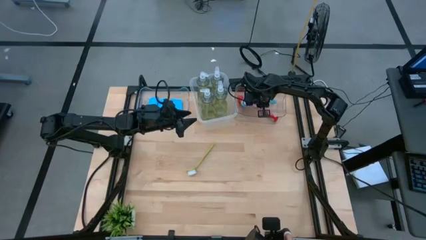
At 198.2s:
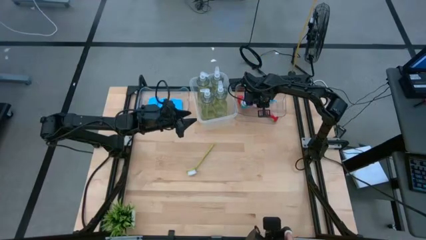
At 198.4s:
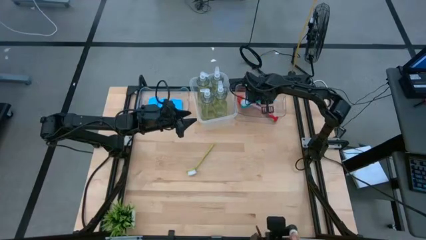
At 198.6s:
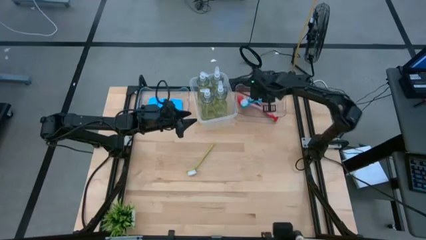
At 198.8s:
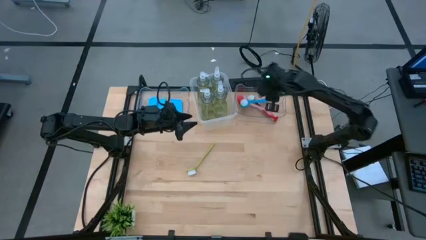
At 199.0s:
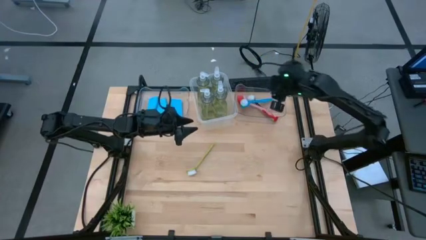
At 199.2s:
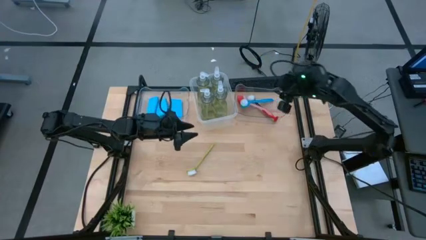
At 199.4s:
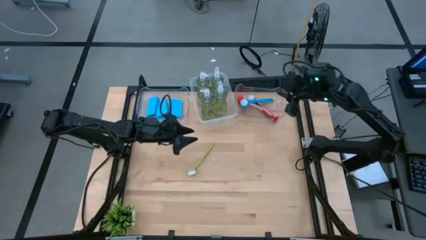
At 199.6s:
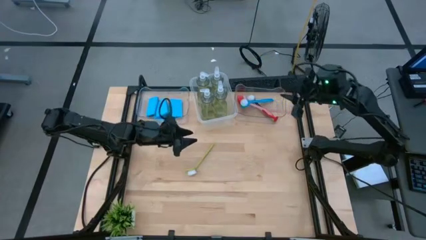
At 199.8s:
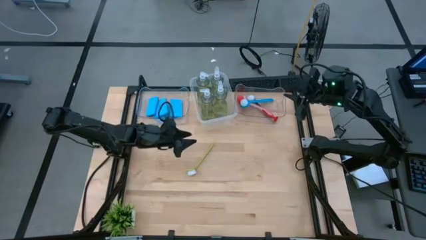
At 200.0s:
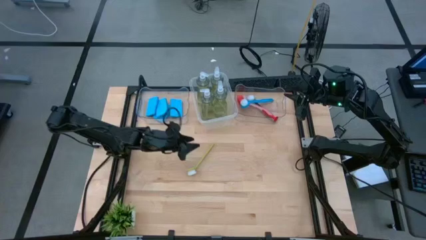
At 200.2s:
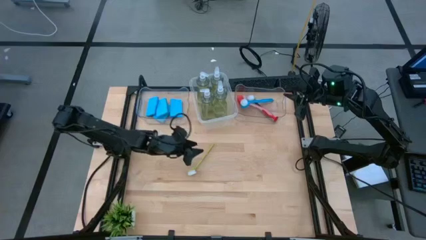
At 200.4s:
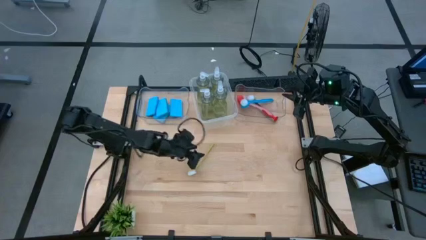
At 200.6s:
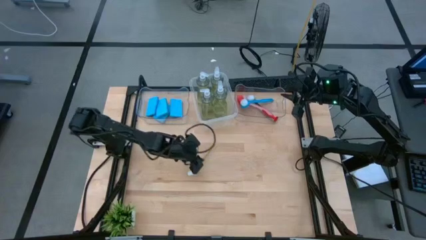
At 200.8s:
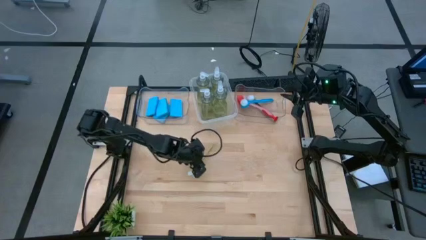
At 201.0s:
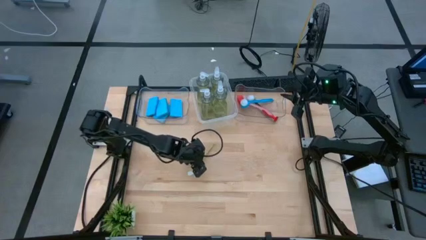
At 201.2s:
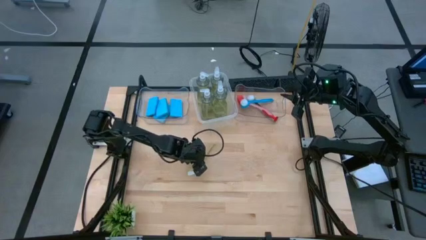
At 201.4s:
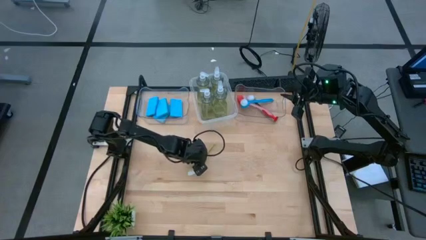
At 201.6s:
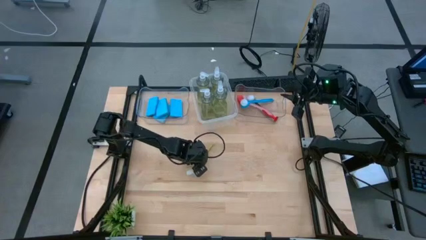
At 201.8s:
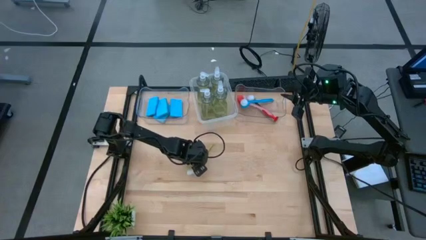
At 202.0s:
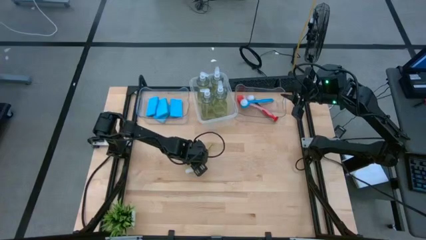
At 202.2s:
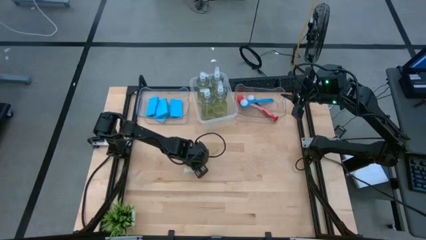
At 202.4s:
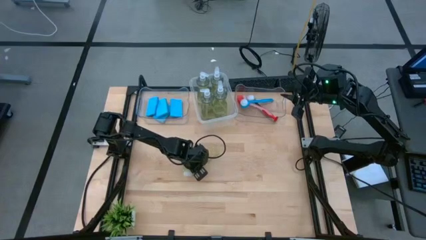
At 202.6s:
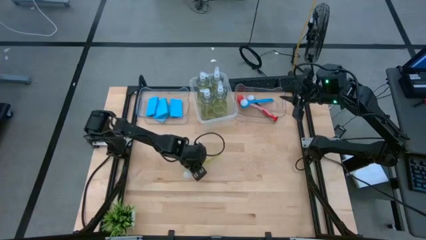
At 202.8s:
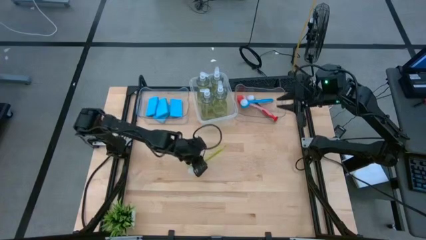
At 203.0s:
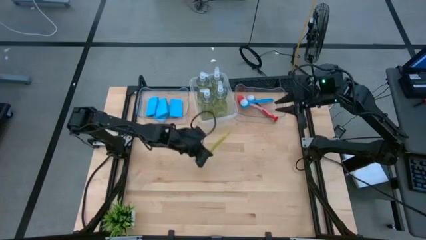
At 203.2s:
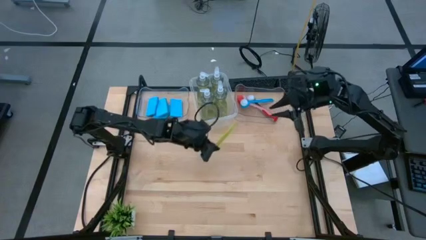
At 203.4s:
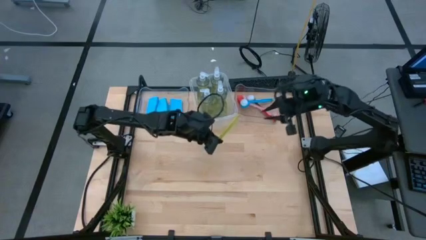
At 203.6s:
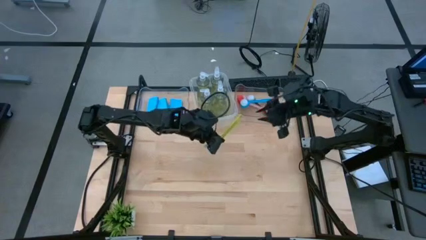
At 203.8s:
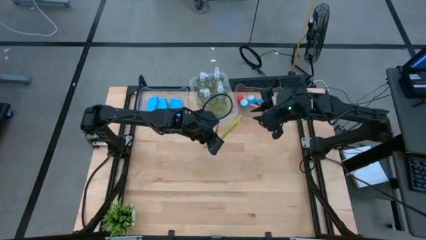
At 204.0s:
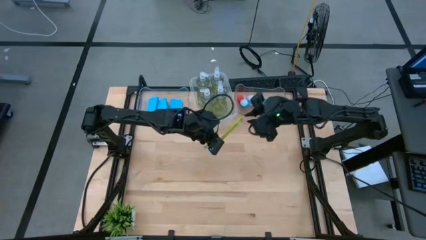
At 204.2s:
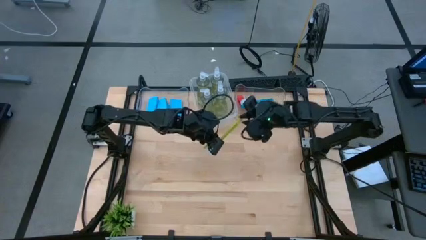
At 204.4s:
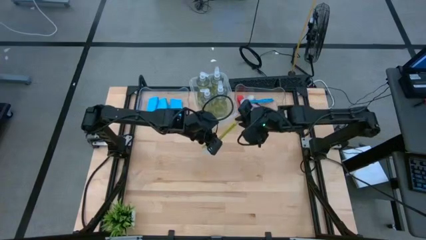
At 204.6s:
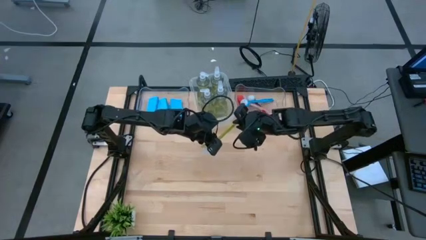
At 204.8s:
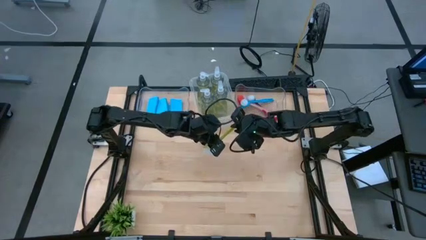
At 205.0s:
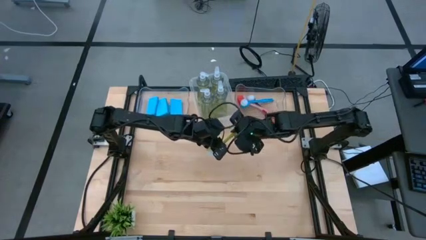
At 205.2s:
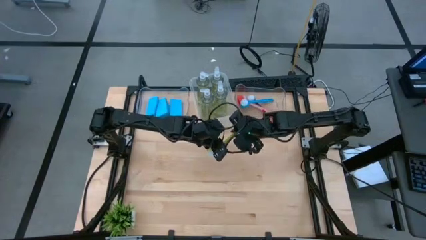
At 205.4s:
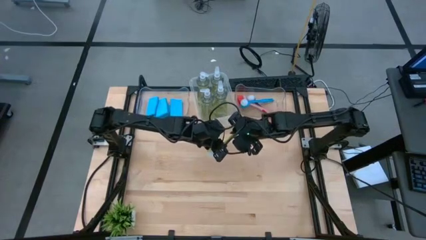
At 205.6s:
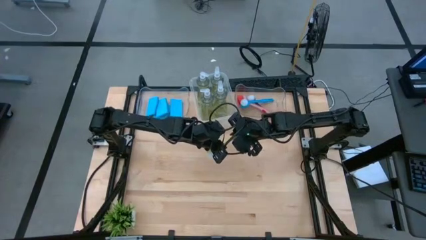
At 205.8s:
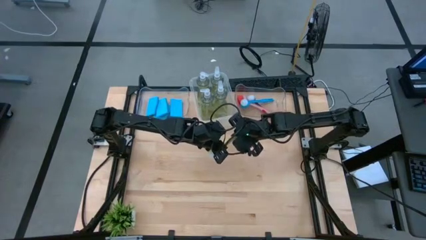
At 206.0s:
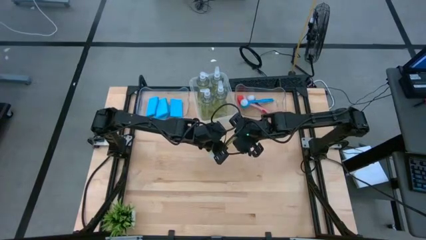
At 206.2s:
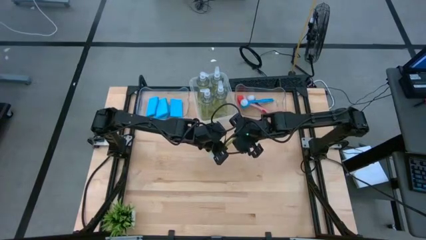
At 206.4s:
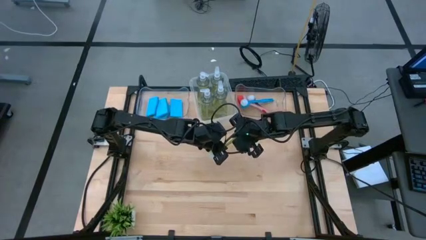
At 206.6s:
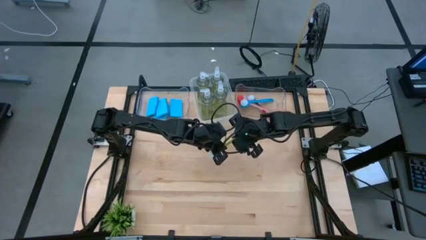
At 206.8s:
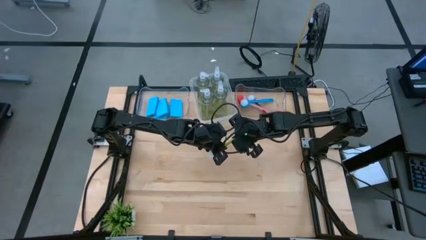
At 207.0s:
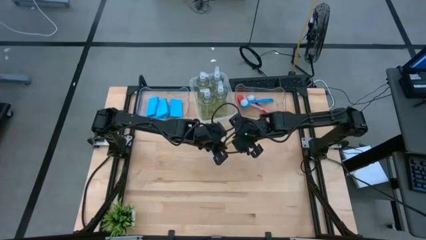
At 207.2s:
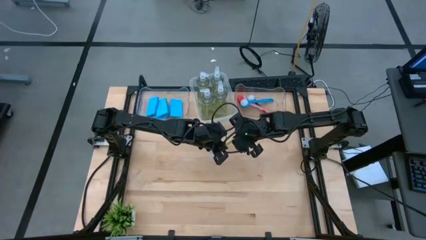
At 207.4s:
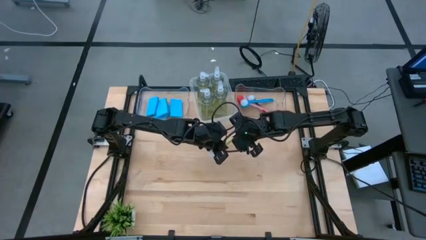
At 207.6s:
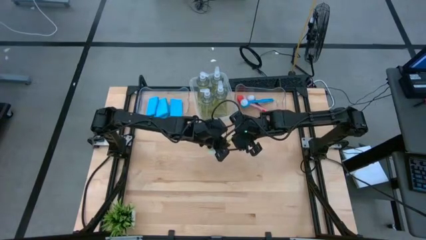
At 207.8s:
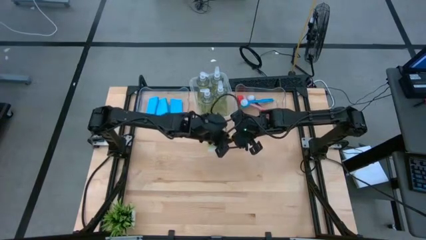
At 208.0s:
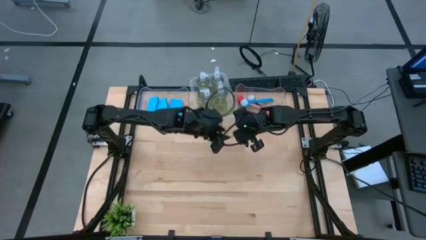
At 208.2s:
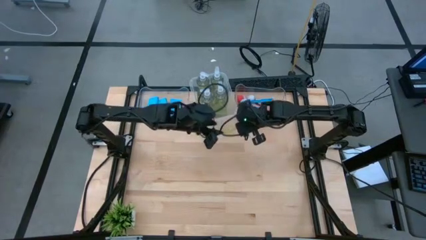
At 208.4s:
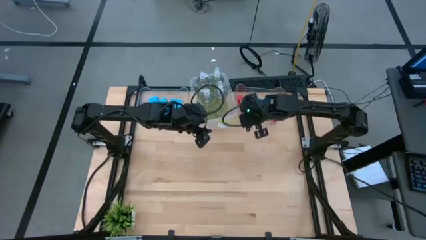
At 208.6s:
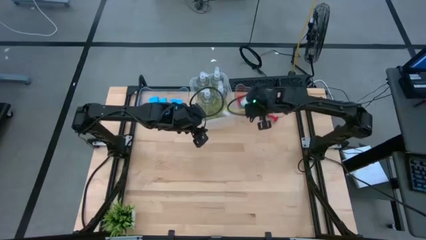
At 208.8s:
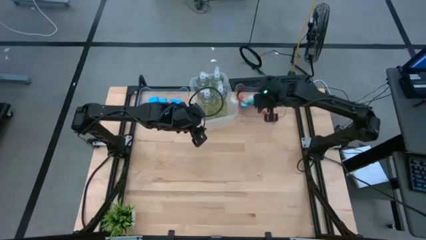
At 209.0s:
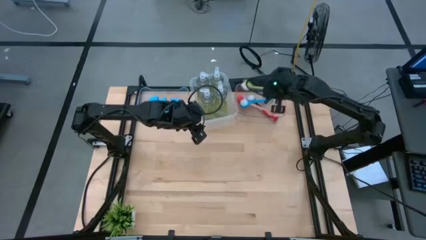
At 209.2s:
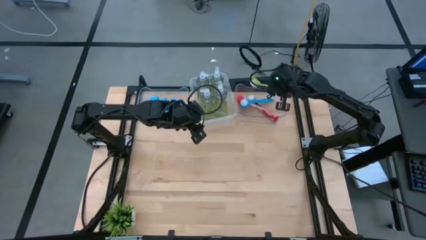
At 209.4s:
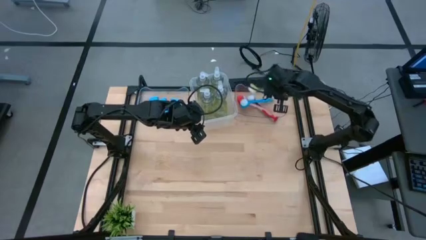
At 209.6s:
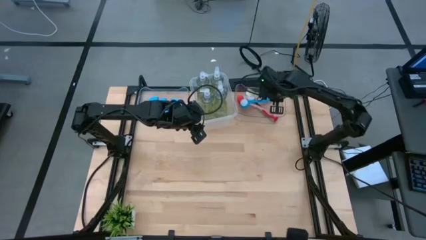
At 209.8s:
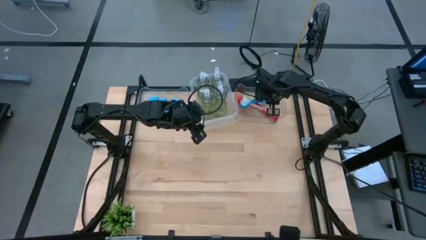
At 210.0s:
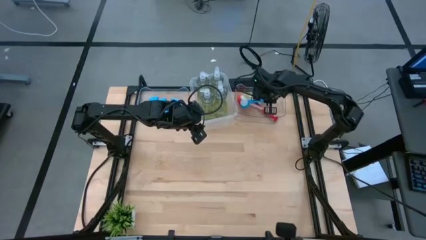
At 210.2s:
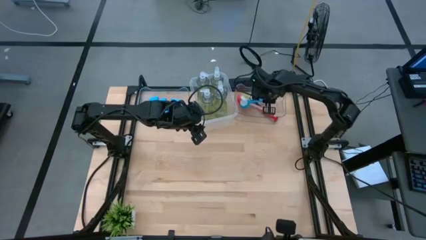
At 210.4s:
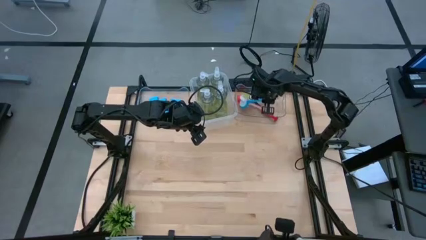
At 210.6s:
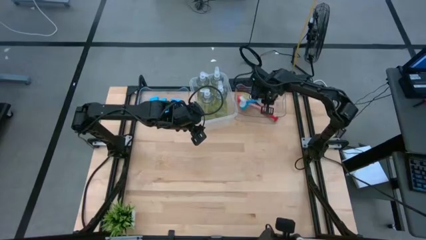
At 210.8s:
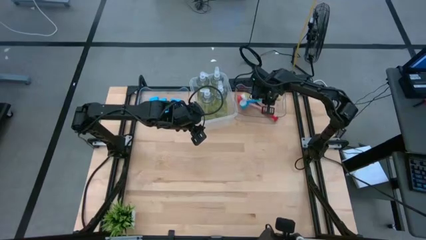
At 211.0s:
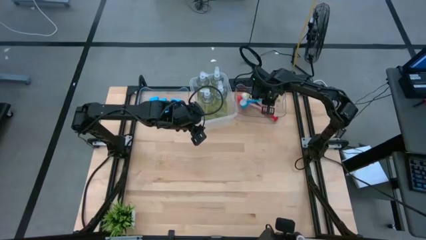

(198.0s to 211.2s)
Task: Pick & Place Kitchen Sink Supplies
Put the green dish brush into the right transparent bin

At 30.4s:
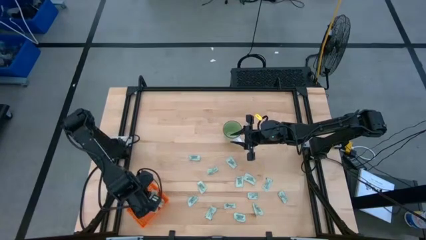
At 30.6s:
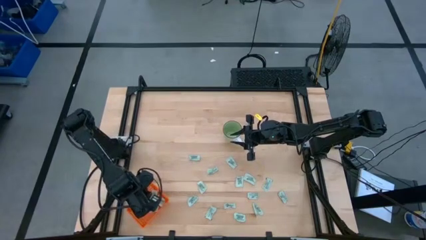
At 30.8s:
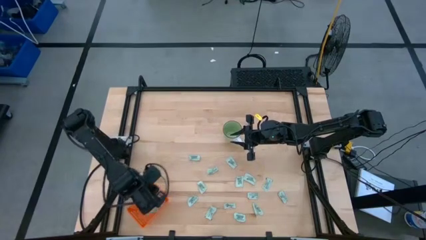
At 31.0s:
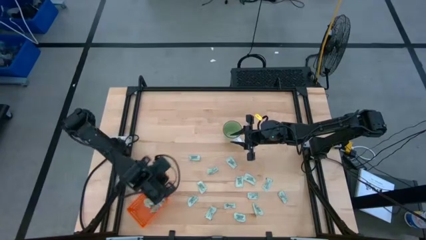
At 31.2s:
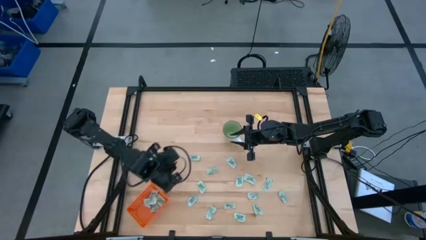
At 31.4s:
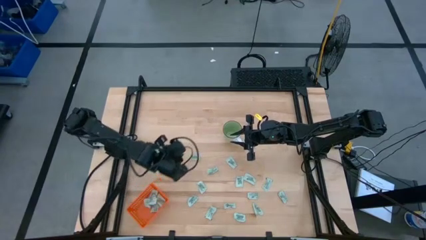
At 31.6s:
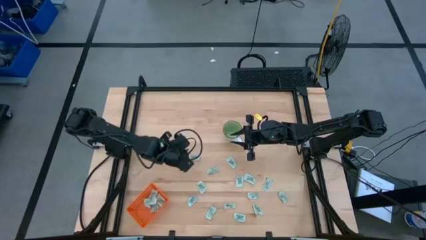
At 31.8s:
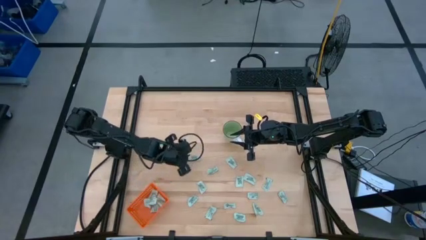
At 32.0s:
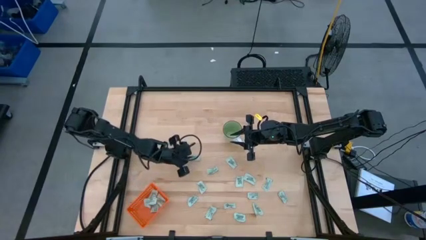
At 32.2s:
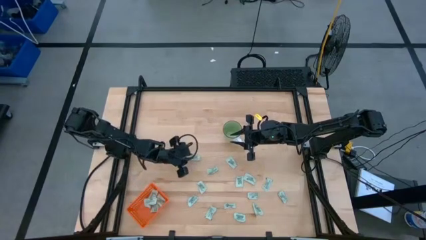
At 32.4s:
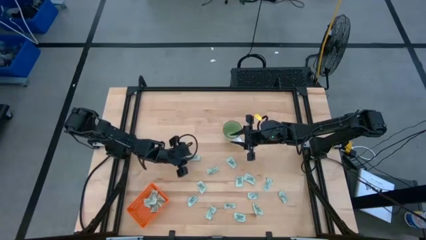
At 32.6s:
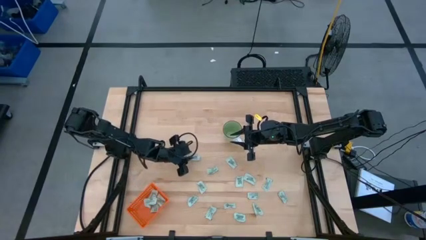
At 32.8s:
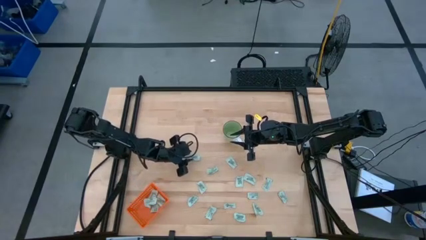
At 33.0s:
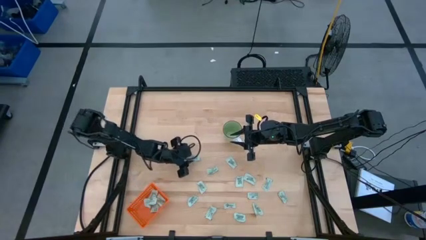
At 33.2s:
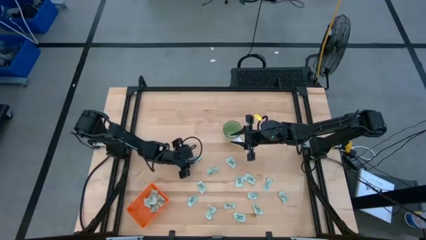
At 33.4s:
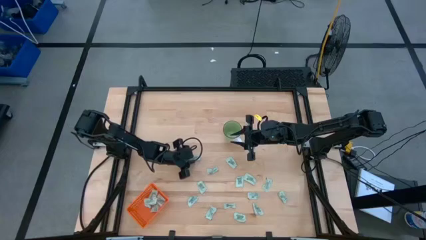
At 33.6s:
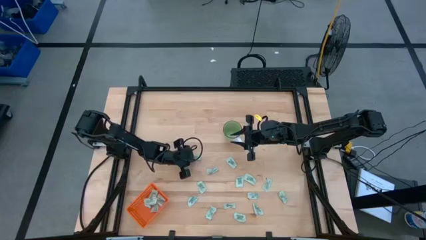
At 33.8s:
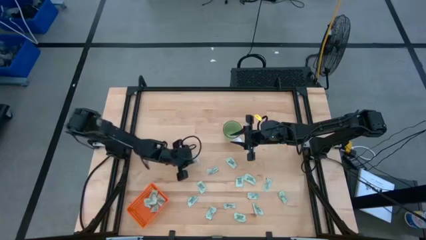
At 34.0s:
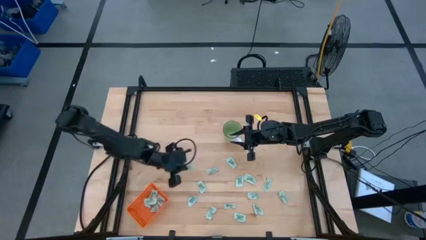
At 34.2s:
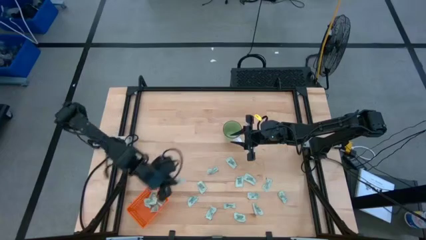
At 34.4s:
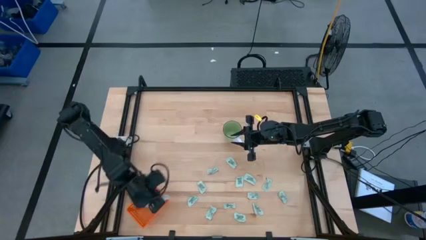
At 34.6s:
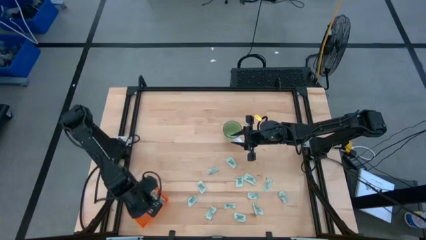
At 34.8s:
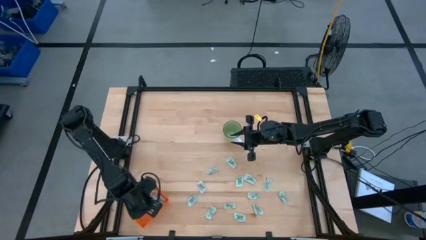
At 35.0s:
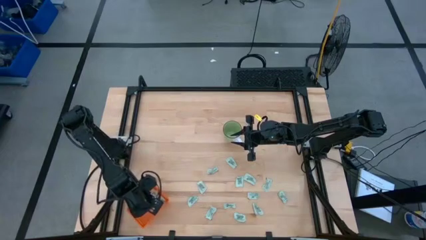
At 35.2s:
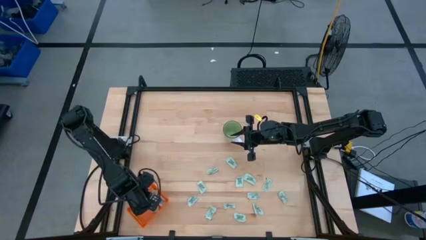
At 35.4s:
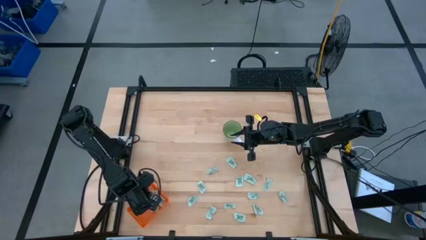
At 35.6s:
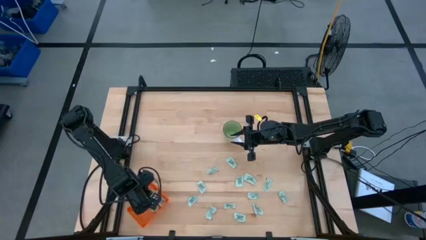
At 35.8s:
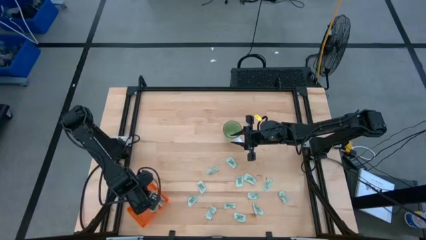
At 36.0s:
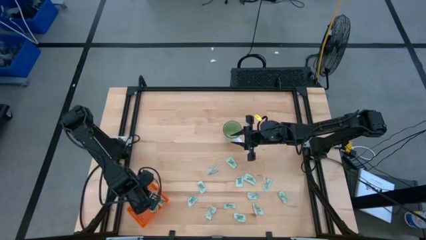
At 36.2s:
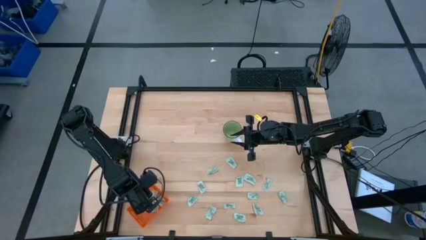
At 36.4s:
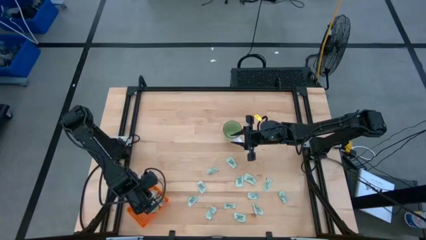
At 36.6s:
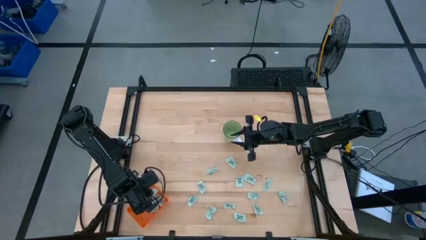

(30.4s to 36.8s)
Task: Pick and place Stevia / Truvia into bins
Put the light green stevia packet into the orange basket
